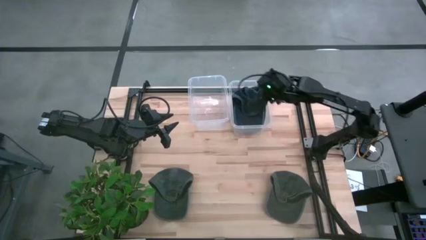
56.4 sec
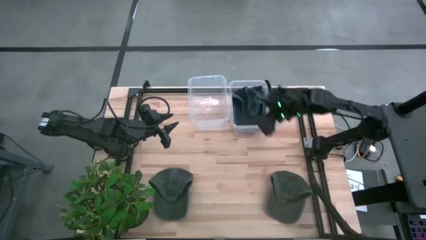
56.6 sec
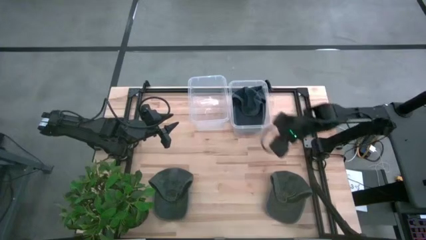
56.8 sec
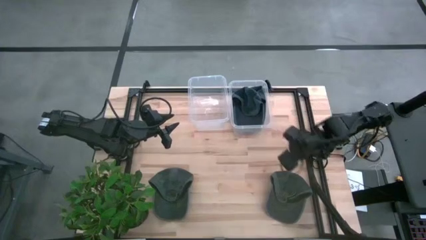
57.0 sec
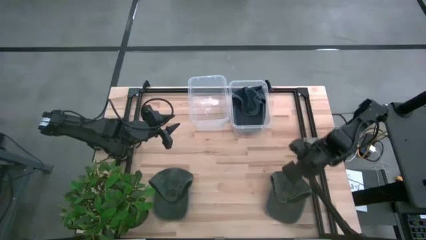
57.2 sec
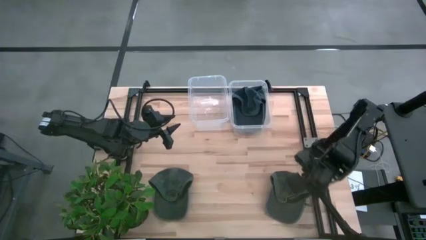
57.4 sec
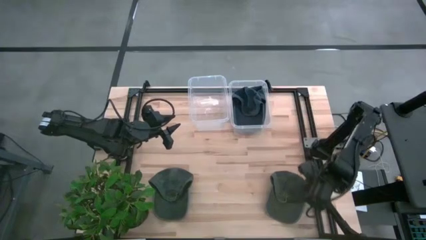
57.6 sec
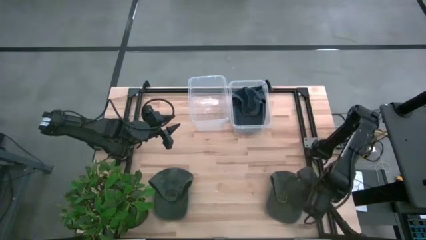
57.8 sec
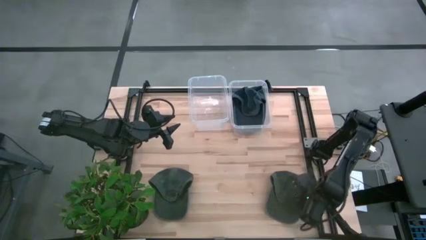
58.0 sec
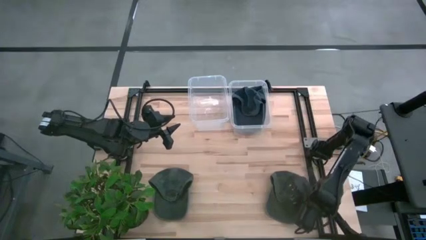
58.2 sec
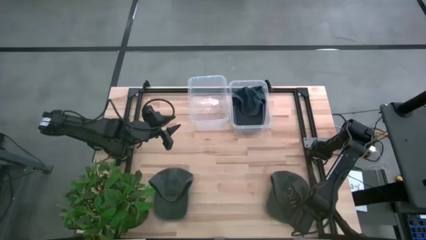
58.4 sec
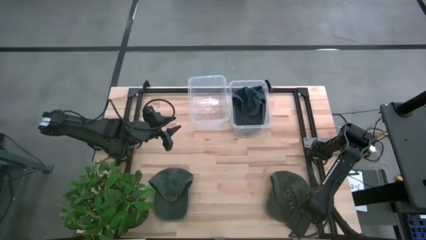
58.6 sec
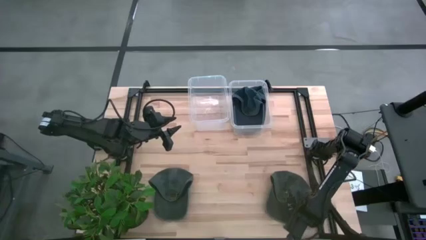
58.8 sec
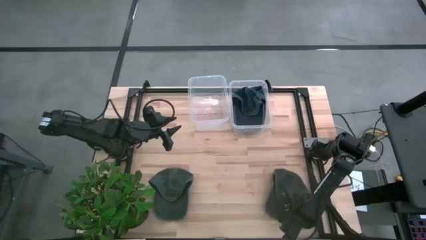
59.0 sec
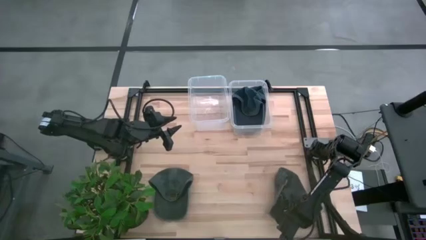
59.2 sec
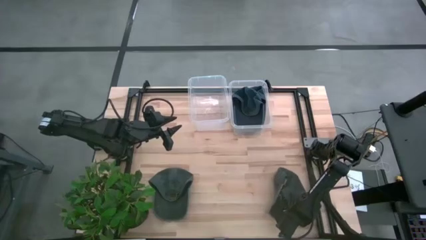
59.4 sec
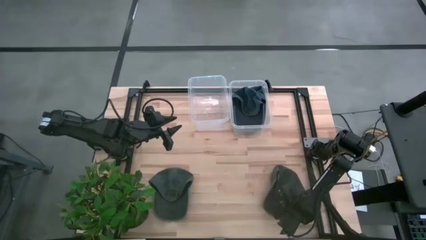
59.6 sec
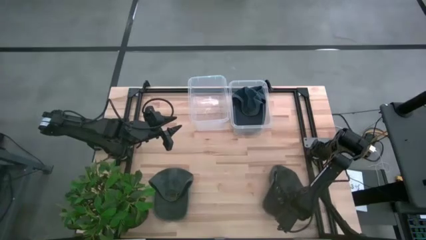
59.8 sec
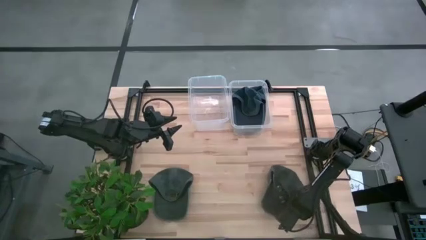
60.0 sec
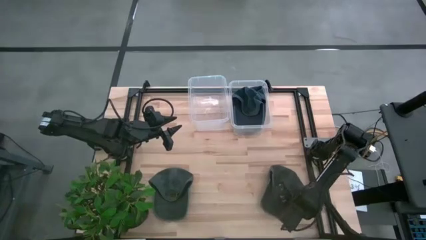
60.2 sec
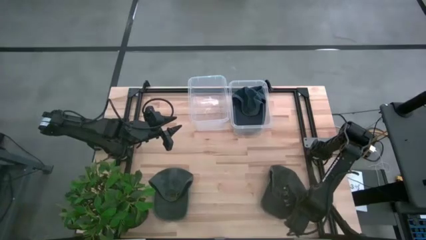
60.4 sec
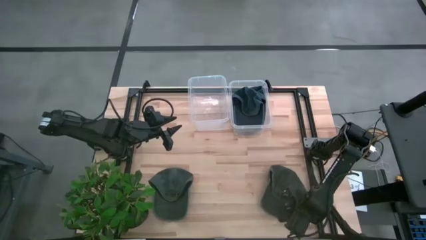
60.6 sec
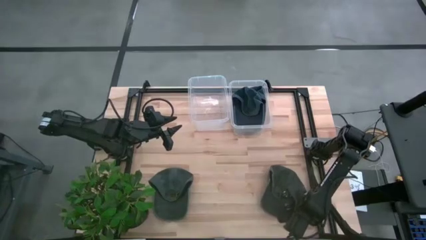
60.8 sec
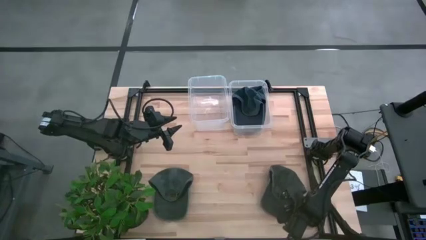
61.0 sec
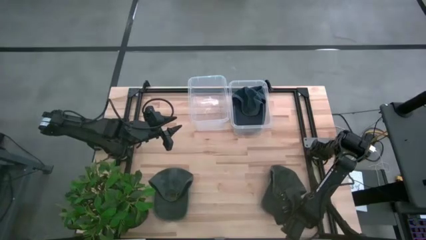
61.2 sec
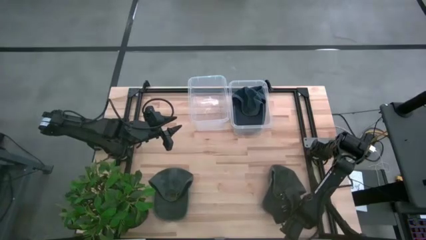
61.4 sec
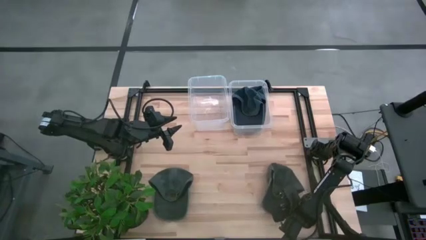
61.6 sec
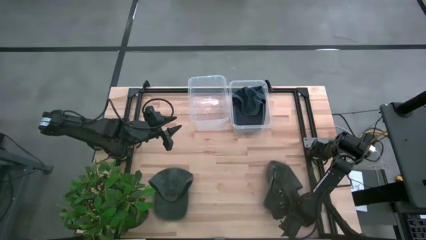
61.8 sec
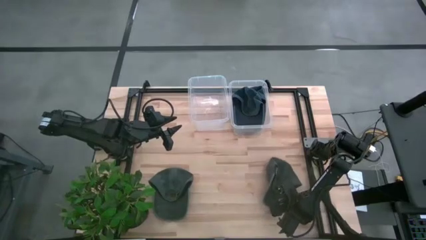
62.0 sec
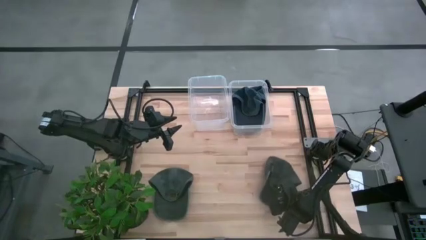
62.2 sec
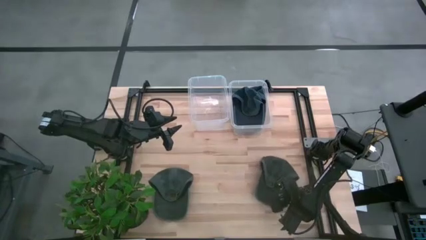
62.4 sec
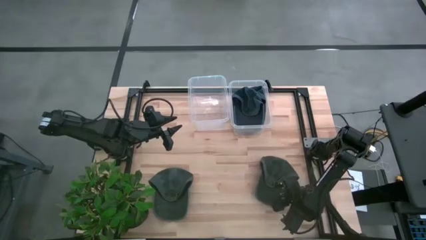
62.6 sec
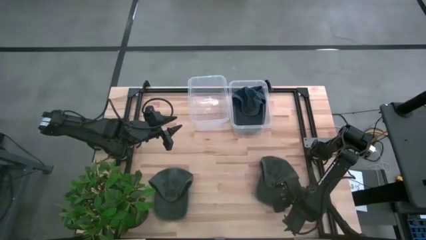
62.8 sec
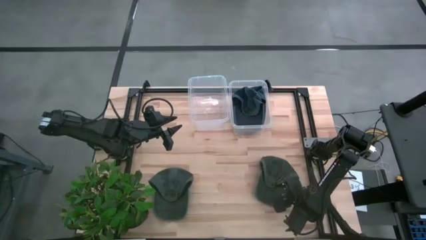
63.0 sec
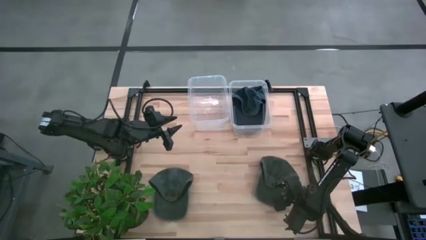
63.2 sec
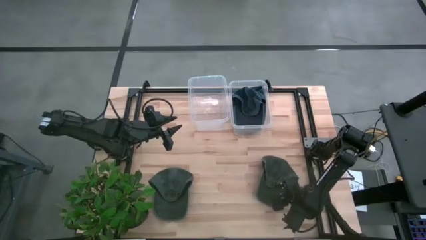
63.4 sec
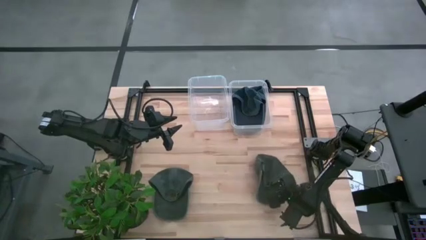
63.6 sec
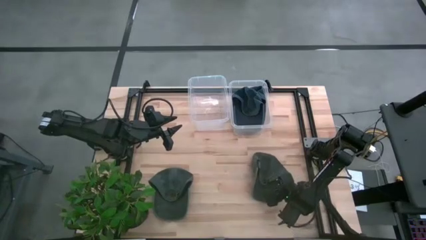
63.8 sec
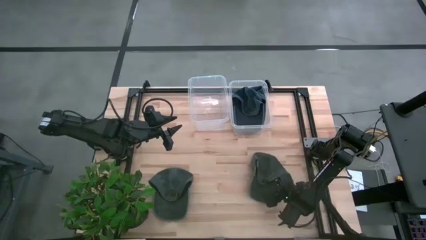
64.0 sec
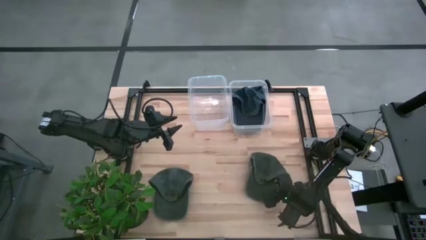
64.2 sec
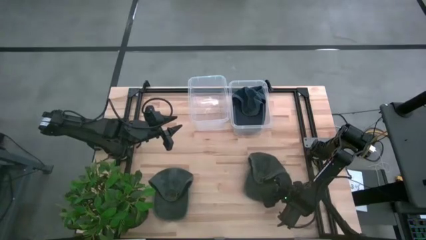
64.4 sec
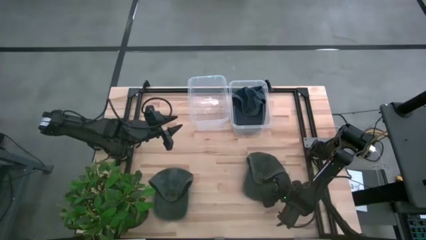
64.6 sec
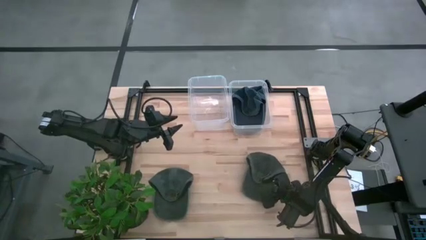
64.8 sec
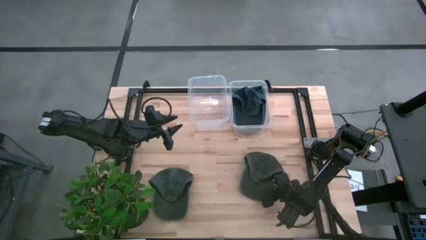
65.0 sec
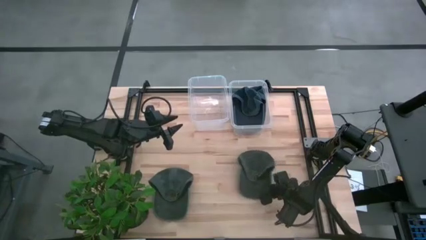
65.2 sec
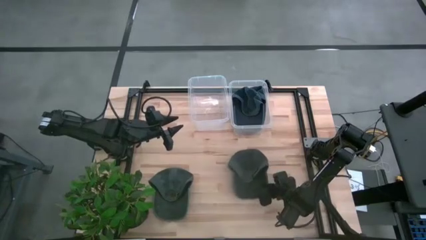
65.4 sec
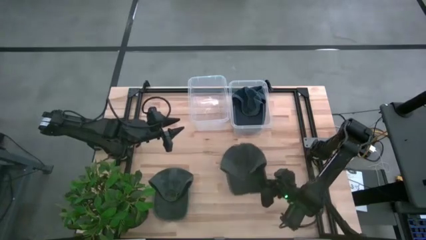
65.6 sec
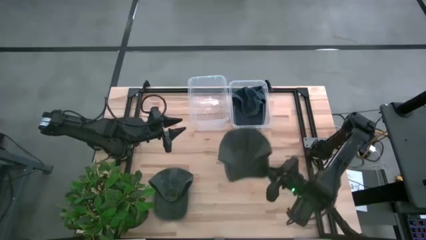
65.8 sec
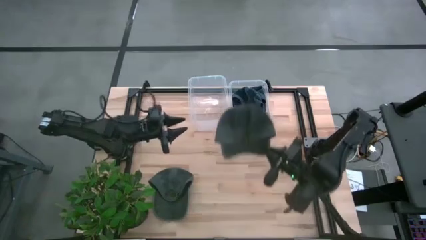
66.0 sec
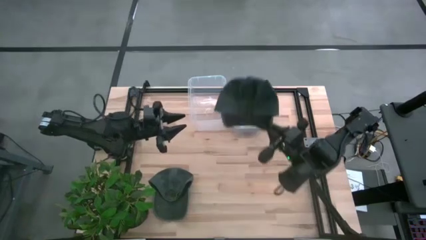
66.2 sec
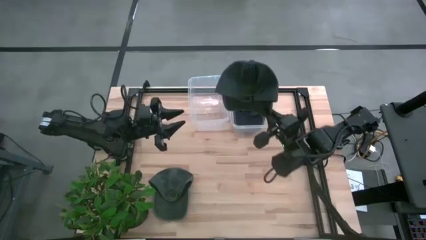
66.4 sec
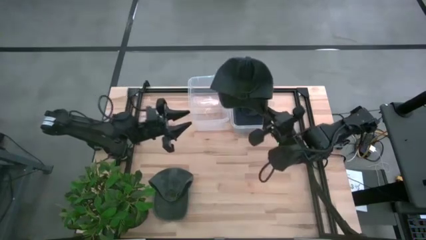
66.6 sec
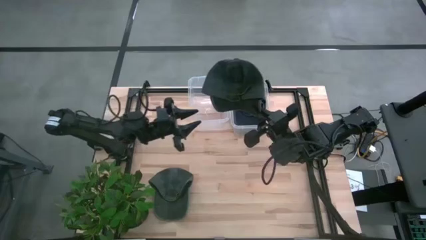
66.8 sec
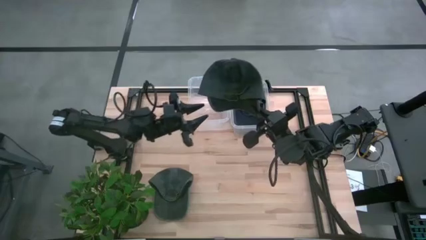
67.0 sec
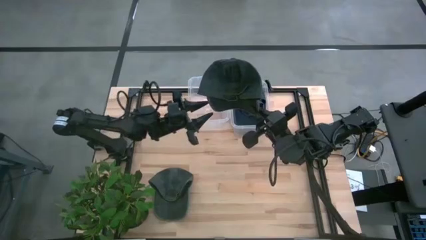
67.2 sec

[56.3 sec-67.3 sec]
Task: Pick & Place hat
Put the right dark gray cap into the left transparent bin
